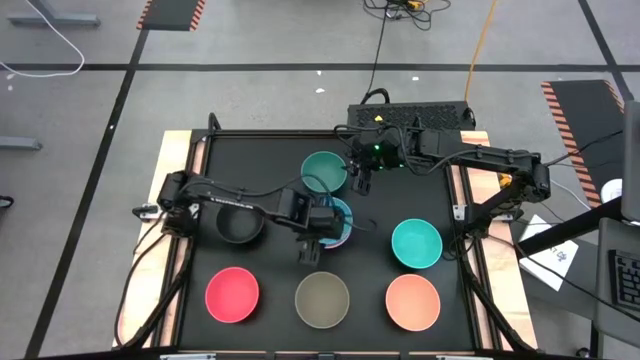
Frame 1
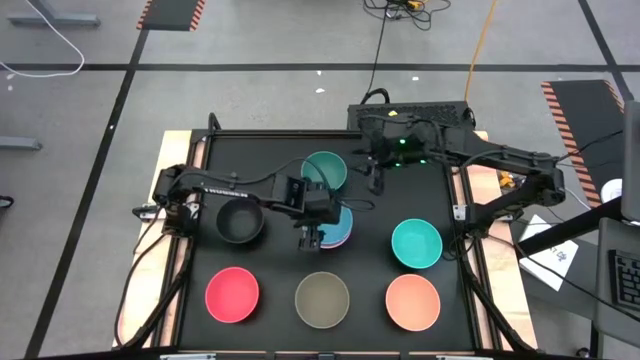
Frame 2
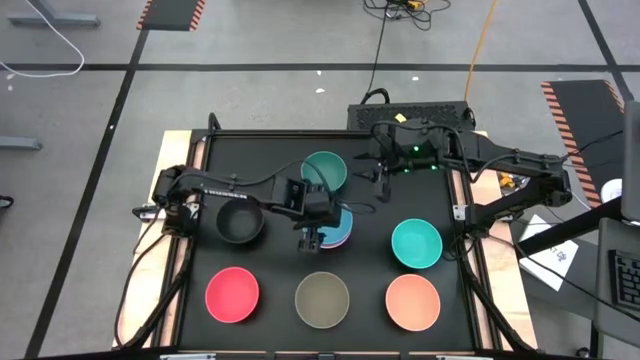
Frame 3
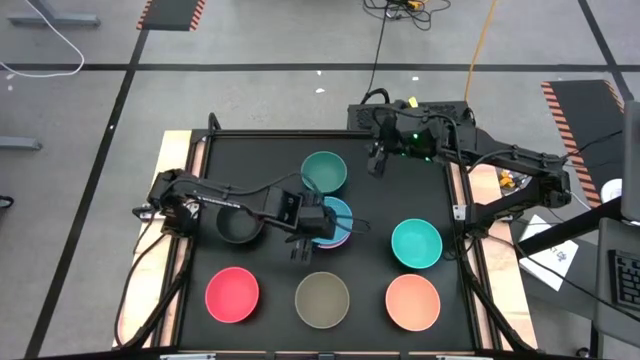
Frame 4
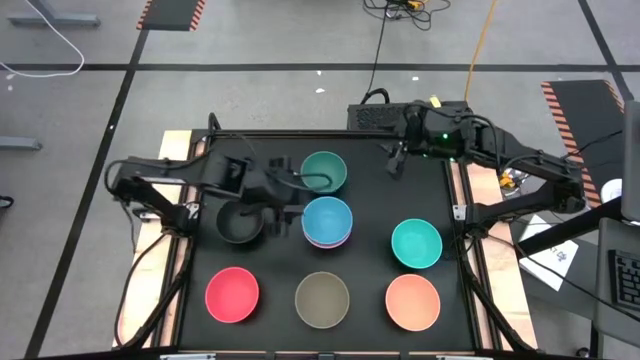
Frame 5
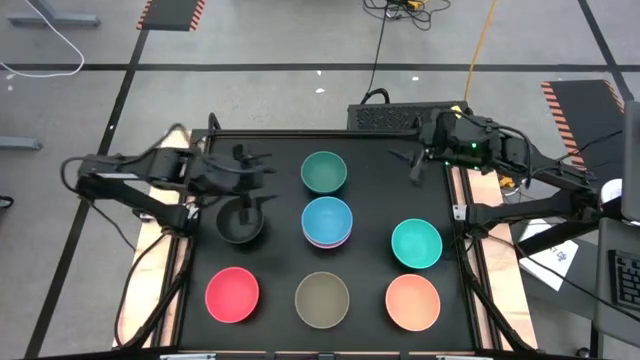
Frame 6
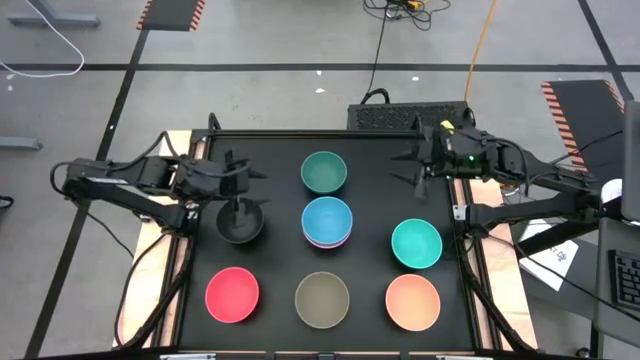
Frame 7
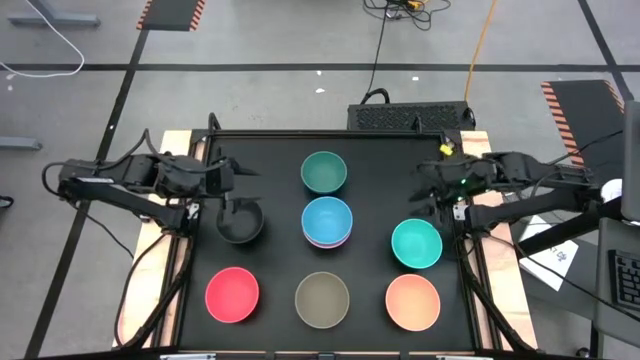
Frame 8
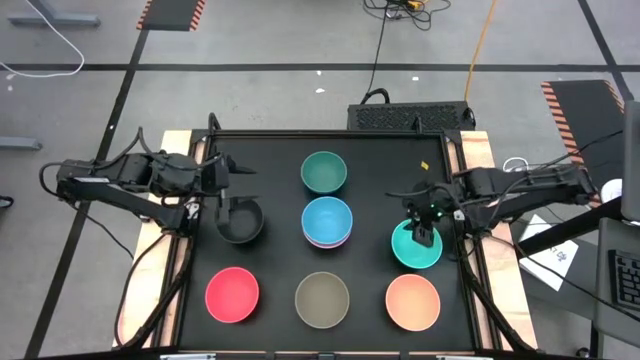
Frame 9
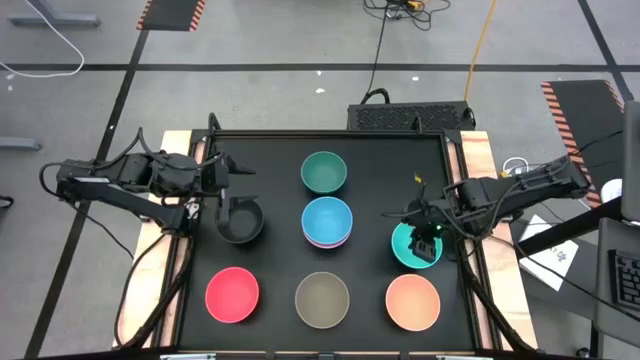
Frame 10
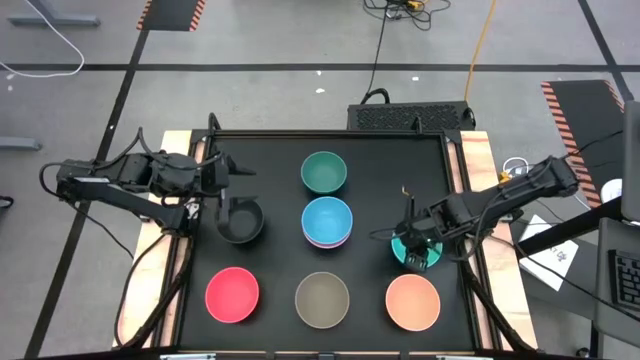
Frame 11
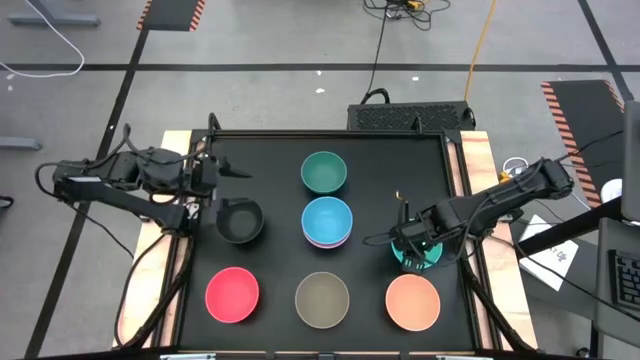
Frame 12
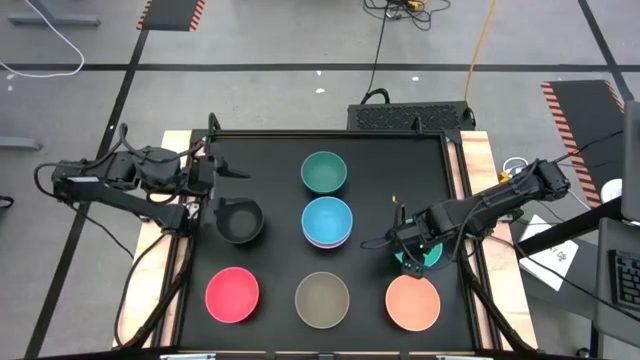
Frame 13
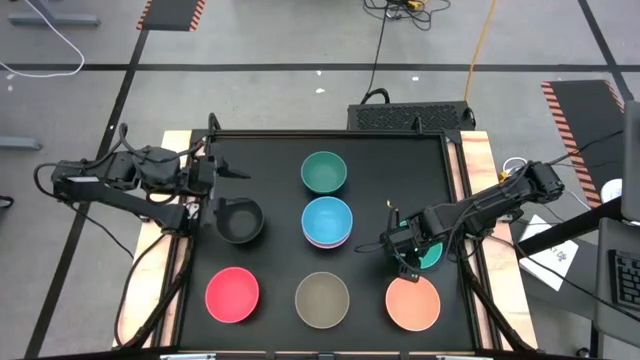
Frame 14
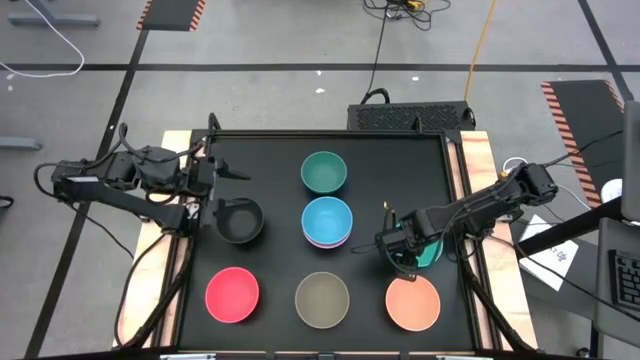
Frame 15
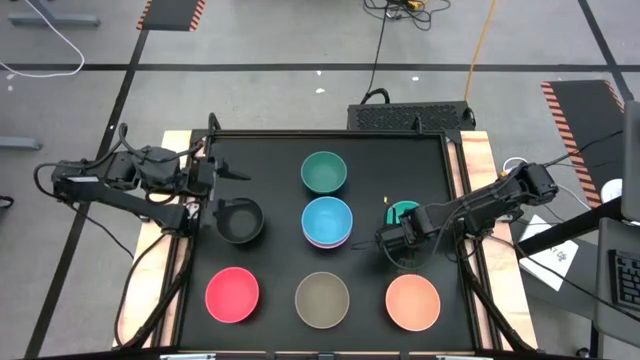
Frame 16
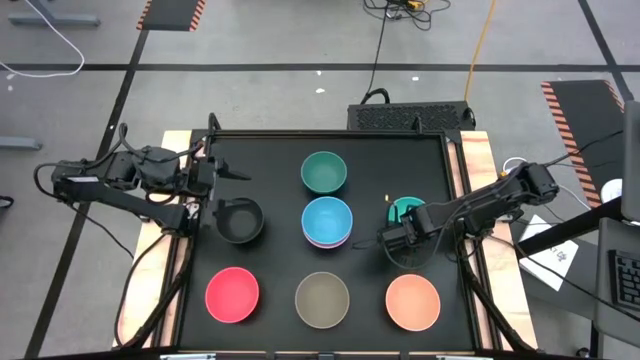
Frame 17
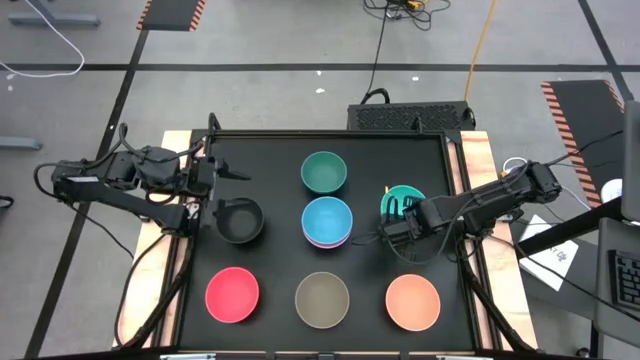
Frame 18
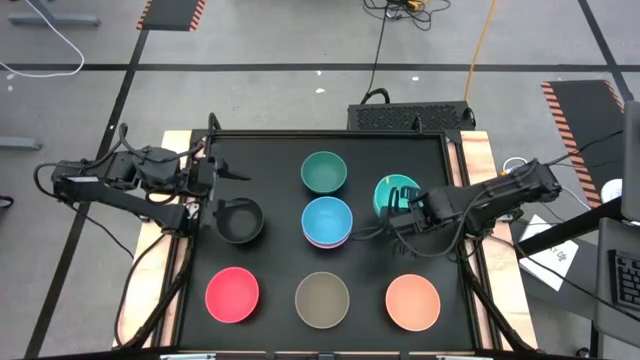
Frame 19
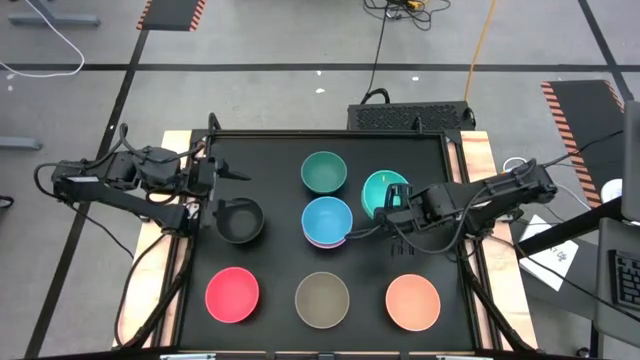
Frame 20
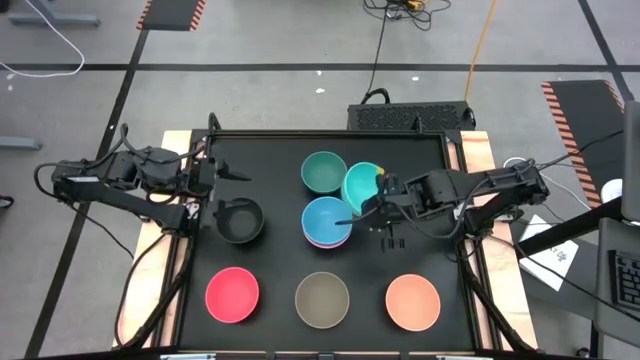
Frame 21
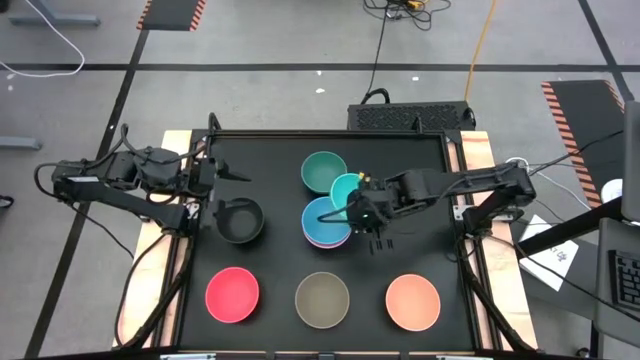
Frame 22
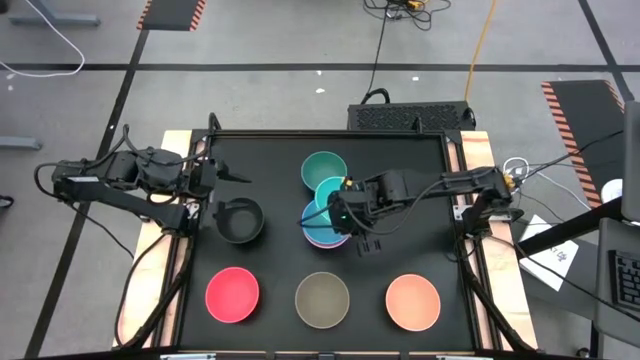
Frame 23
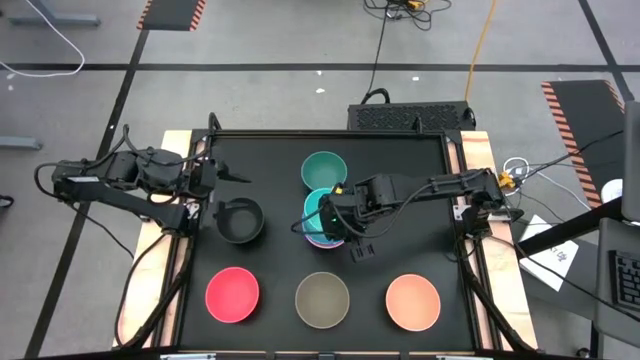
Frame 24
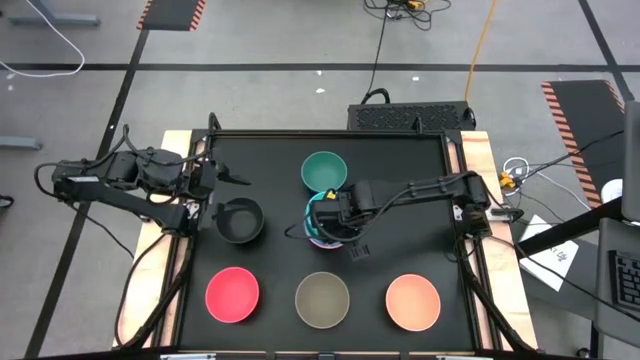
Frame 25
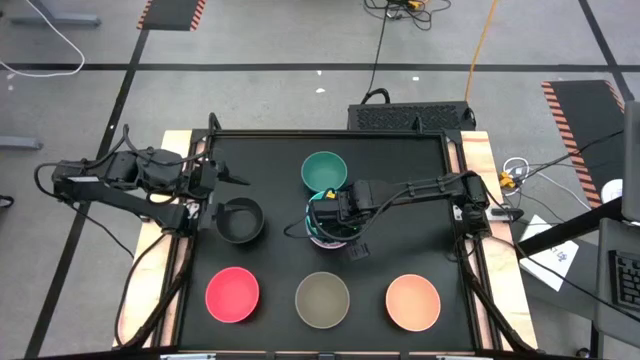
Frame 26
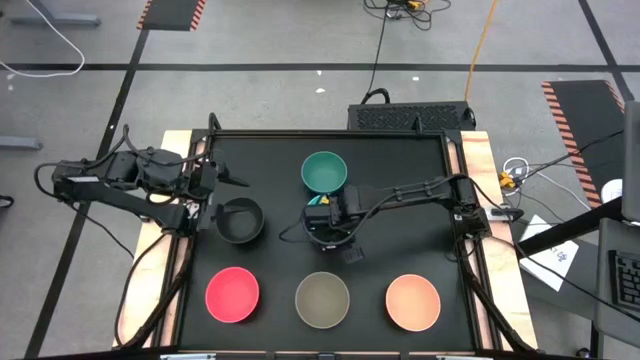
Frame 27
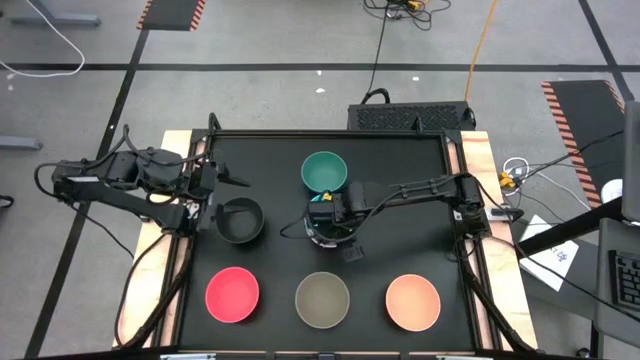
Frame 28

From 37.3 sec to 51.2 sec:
Task: Nest bowls inside each other
Stack the light green bowl on top of the light blue bowl

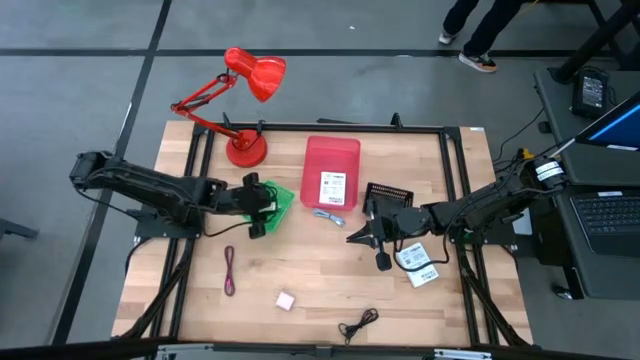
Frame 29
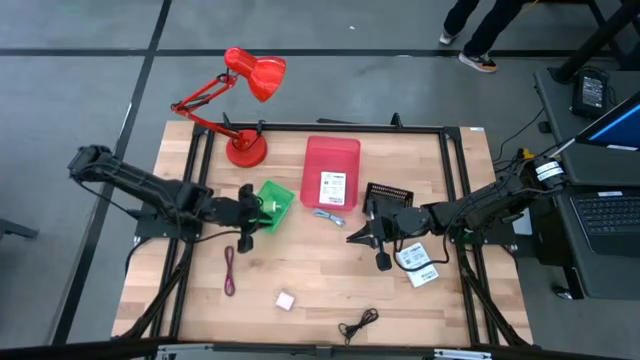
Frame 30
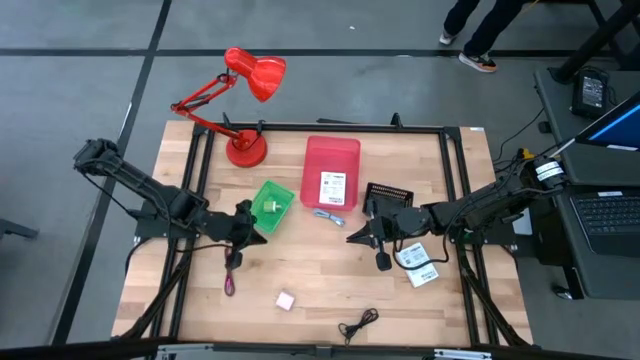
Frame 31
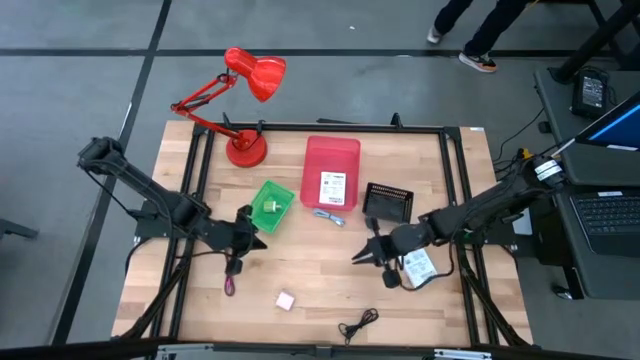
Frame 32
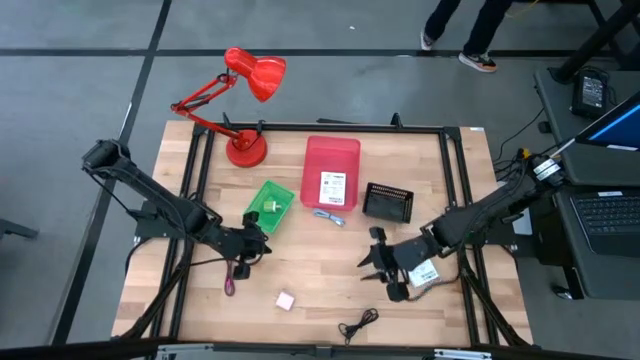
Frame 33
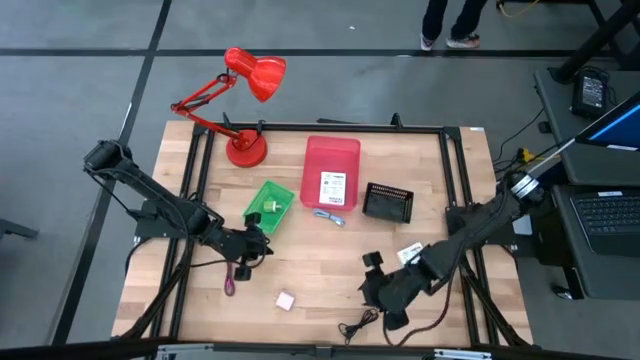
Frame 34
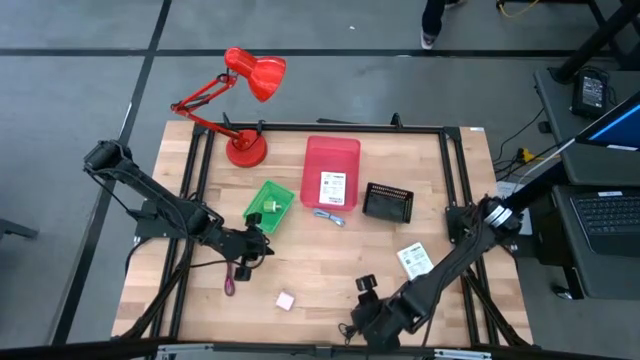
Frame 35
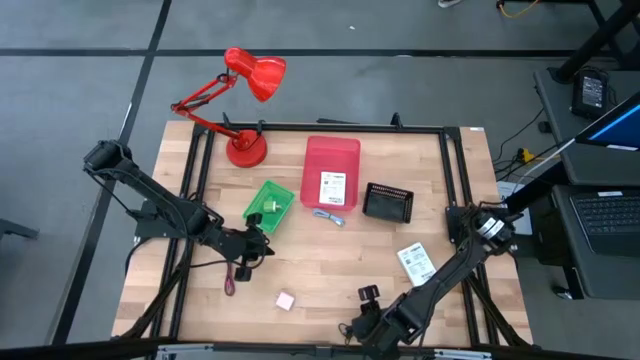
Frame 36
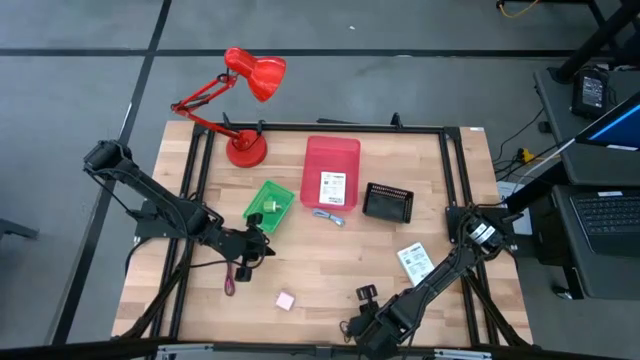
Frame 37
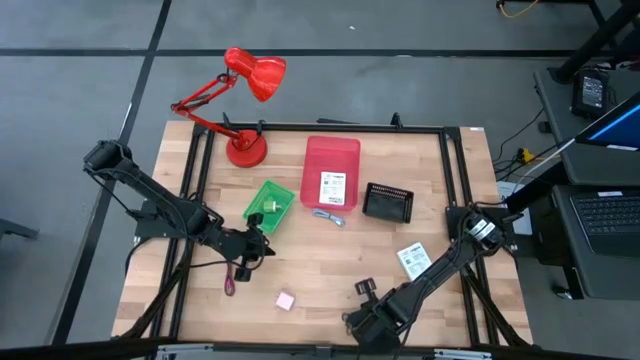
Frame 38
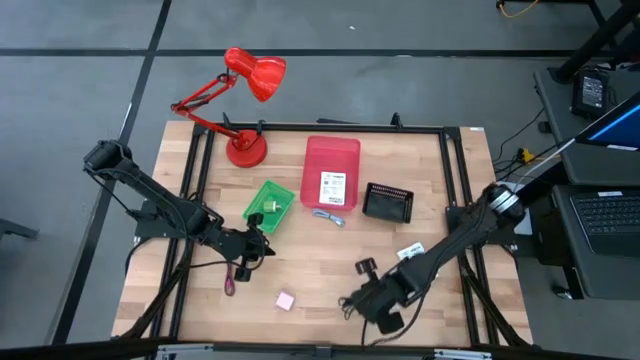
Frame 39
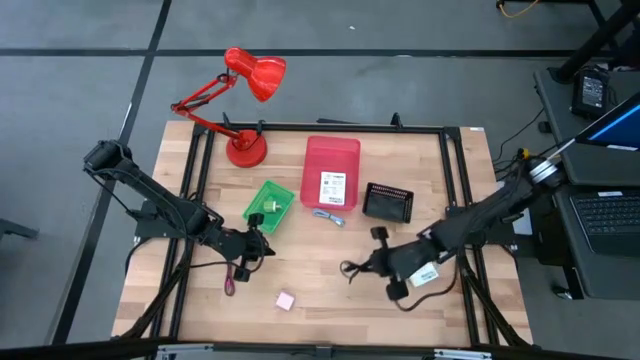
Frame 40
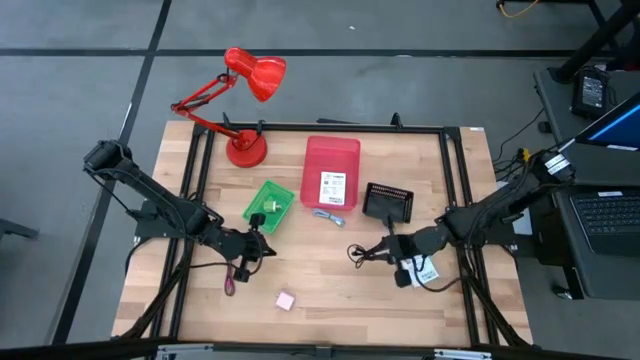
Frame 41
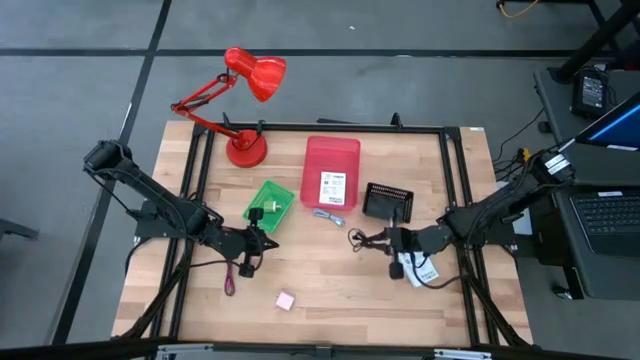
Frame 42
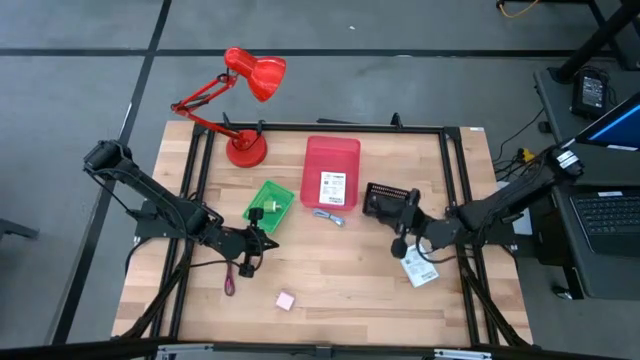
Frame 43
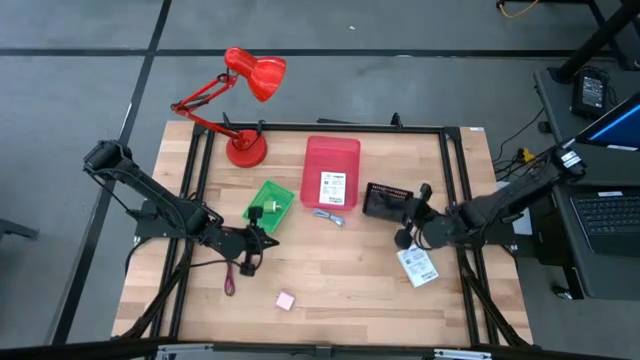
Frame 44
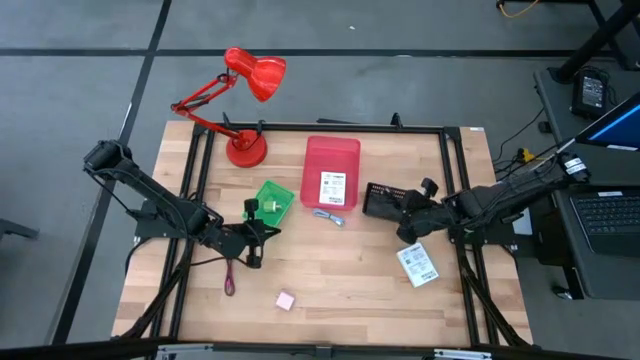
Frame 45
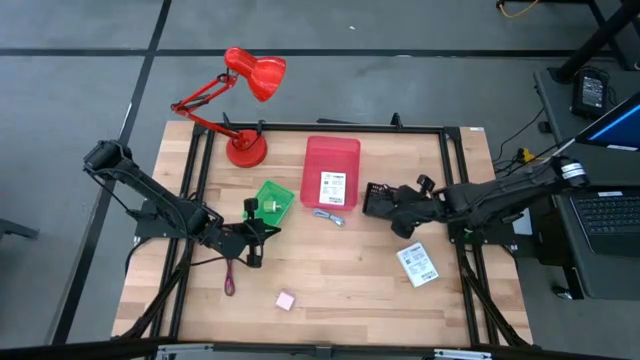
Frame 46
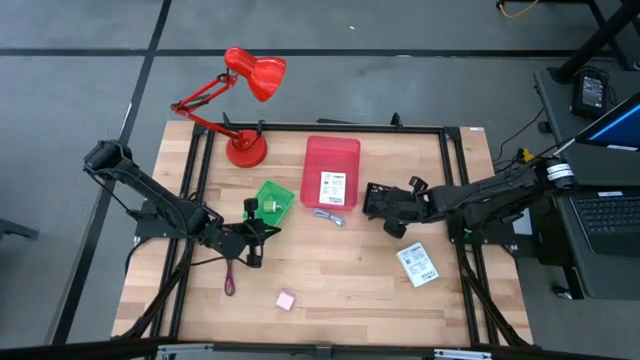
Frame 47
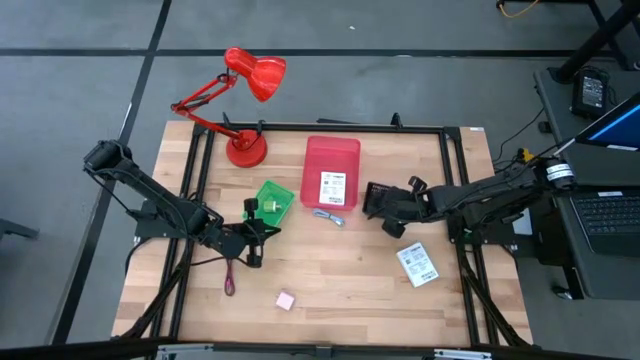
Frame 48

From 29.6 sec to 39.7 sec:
Task: Pick and place items into bin
Put the black charger cable into the black bin
